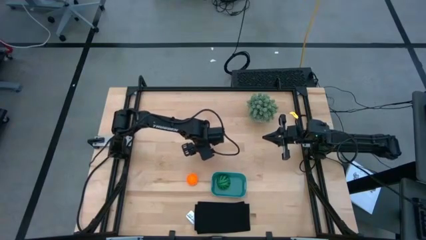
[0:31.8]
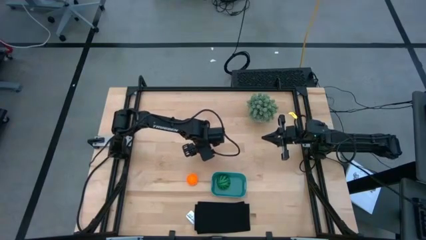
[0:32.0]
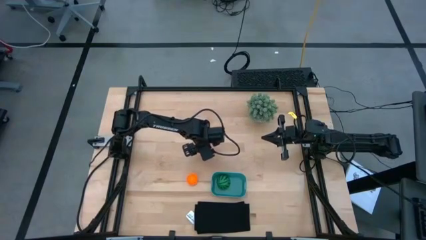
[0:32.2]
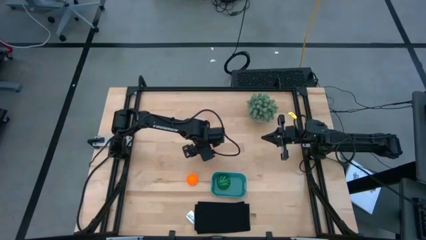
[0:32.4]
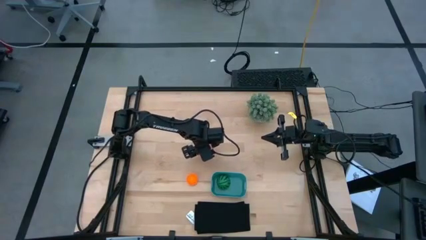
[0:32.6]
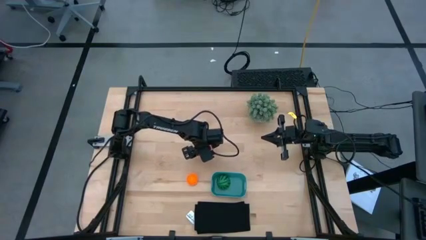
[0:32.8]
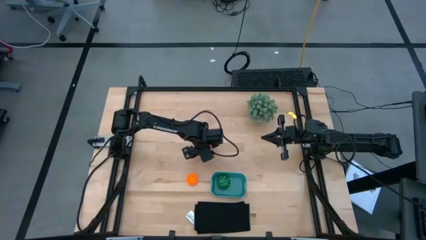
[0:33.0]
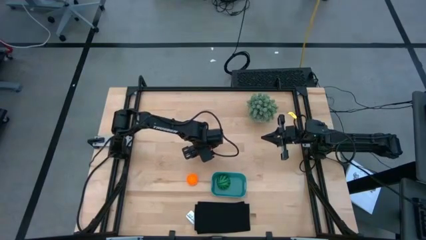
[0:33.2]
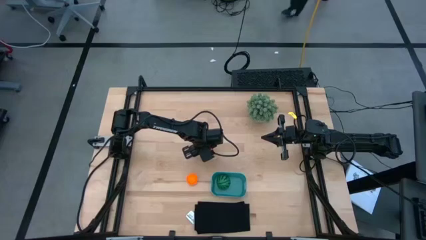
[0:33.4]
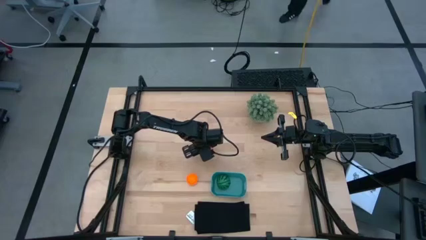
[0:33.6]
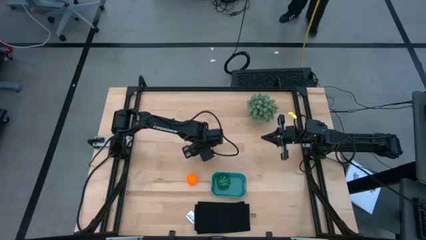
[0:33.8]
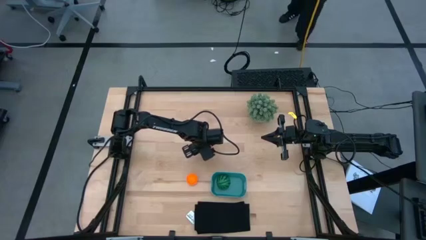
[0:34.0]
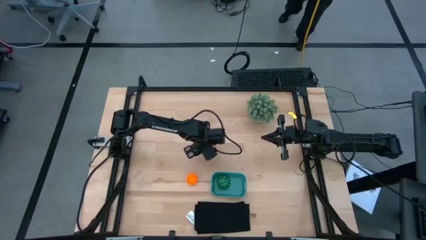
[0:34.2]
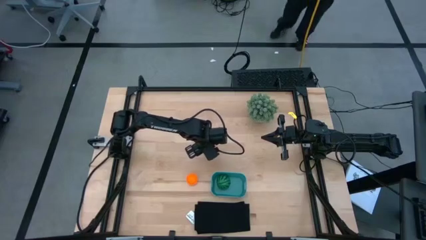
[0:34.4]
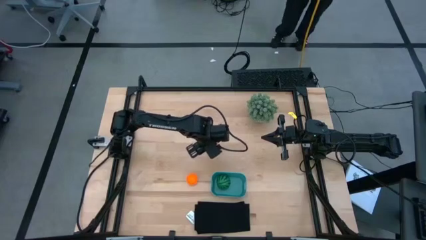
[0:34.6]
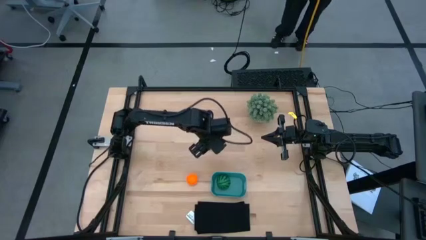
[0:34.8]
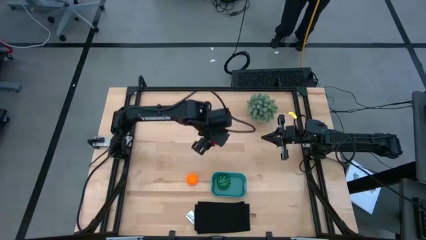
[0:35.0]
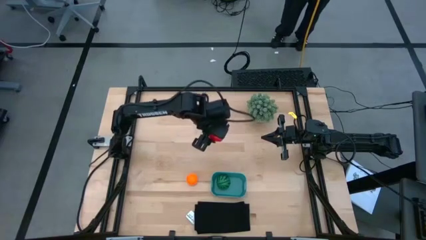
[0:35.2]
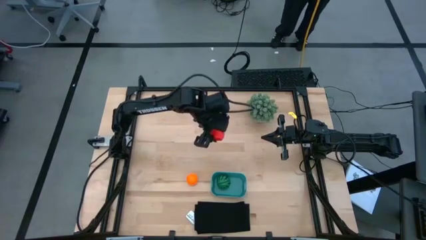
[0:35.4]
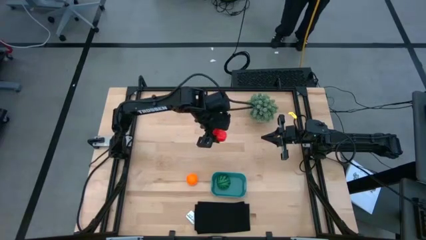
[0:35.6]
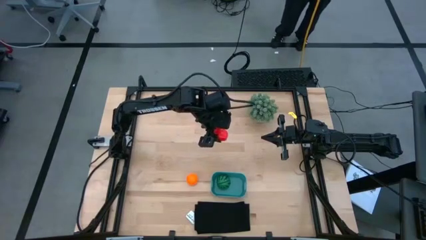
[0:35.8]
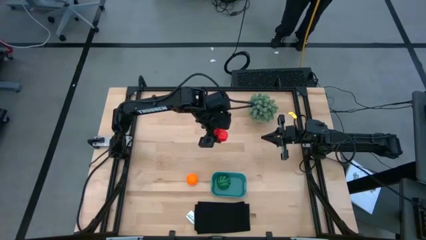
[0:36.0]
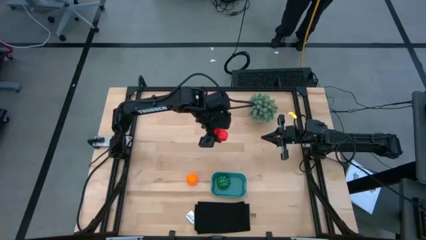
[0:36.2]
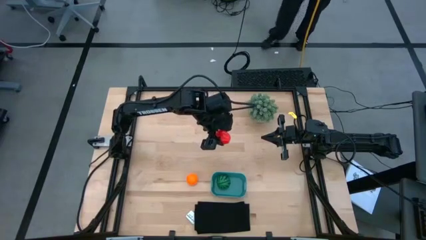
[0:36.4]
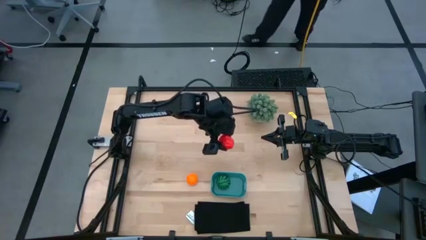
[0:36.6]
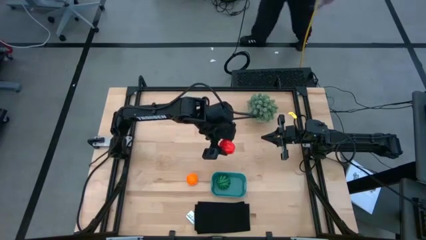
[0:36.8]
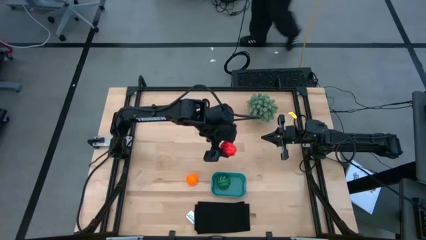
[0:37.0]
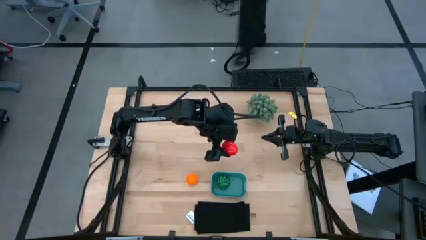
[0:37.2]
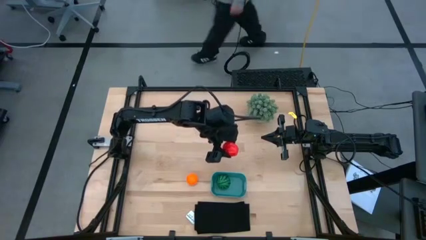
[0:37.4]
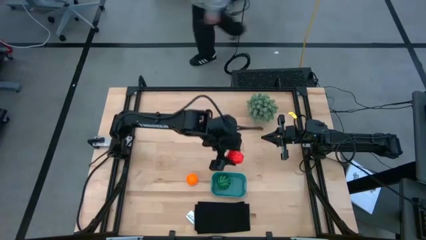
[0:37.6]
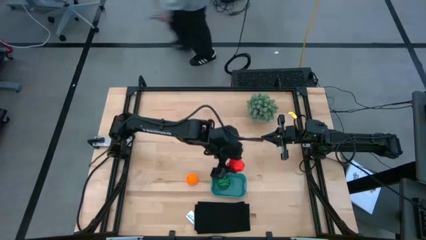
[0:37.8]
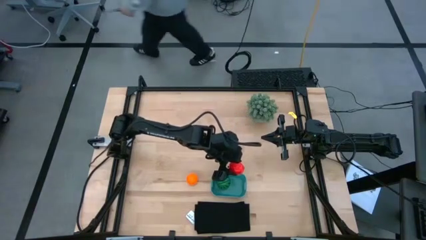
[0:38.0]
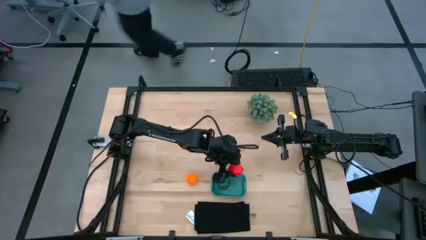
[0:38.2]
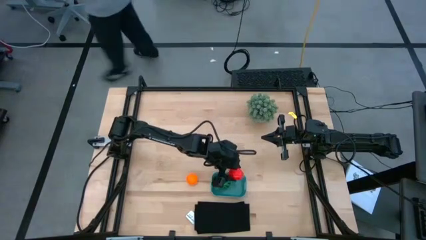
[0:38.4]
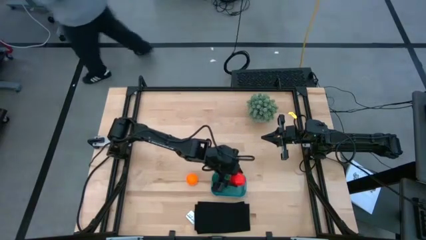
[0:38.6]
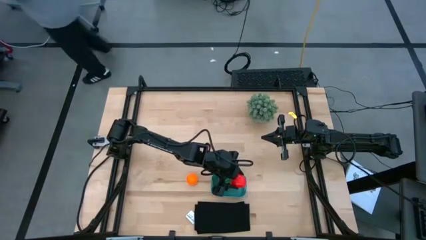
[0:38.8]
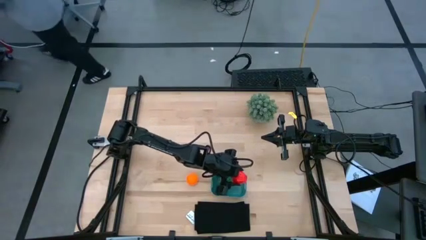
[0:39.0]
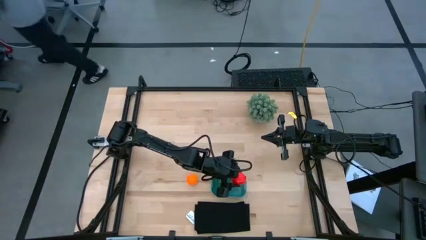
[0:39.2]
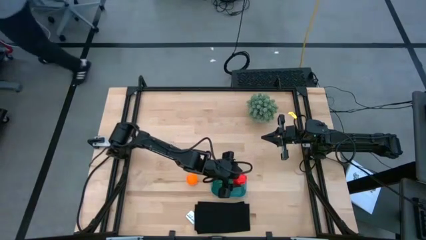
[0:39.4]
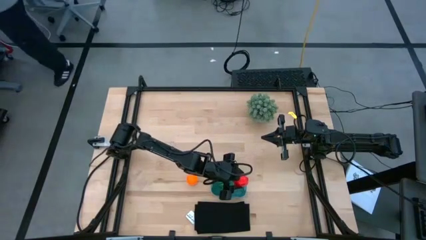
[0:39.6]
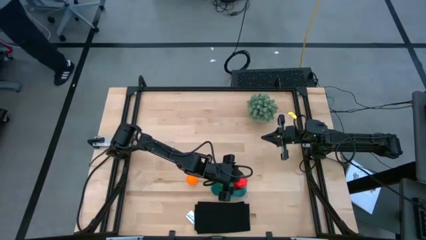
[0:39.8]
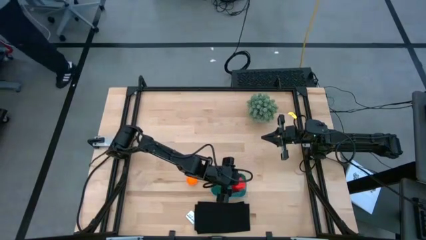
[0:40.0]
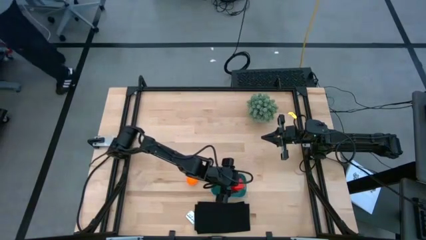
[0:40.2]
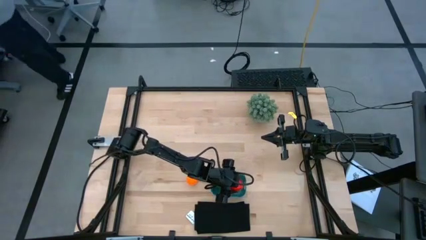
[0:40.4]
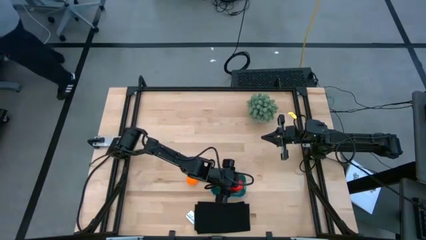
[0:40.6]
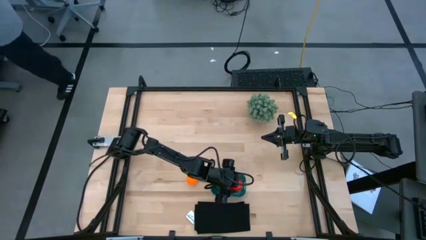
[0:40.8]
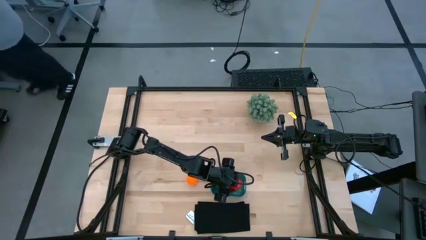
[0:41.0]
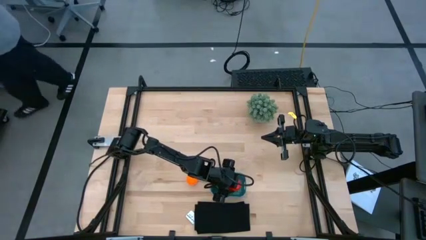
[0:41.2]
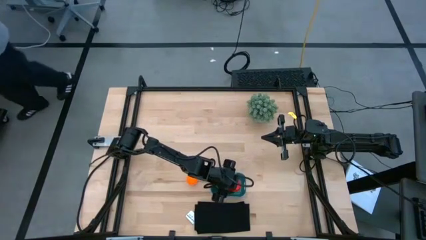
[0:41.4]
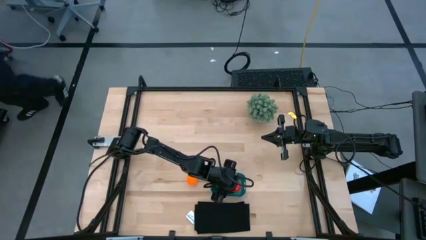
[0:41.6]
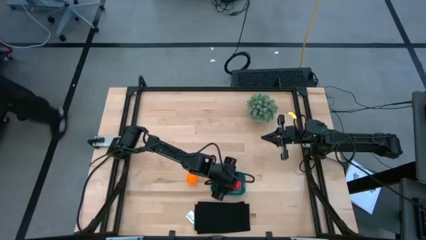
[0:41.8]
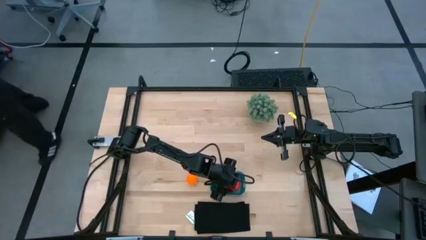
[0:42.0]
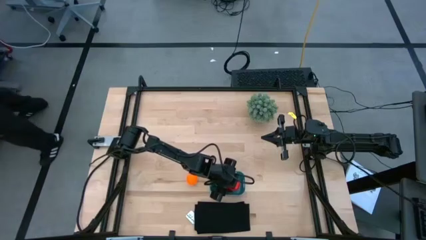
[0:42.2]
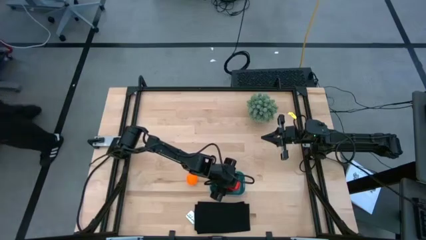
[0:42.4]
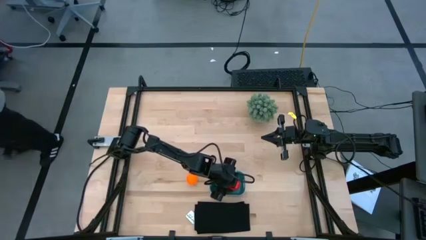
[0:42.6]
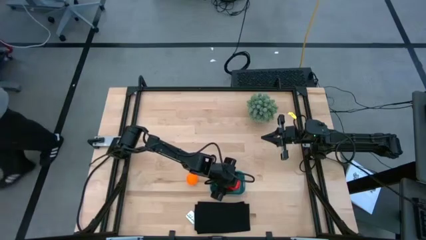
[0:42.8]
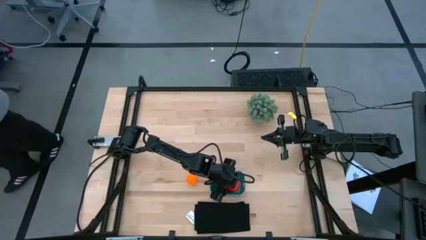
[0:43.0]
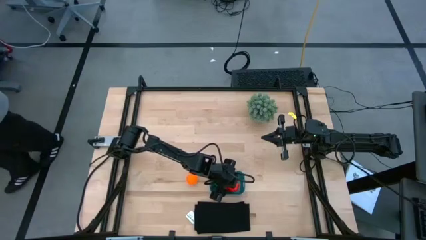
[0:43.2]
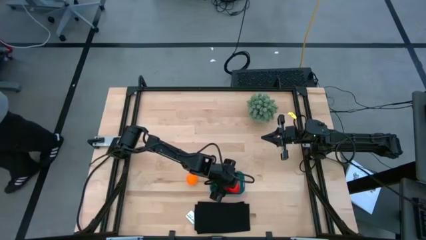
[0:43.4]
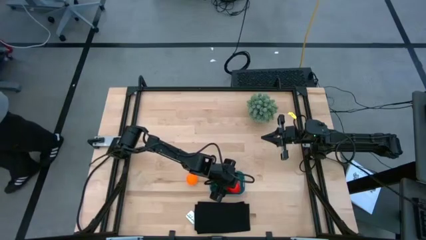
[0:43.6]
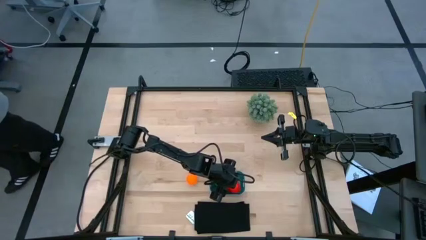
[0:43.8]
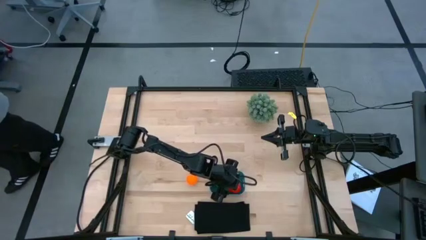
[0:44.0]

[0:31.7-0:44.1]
Task: Pick and placing Produce into tupperware
Put the apple toy into the green bin

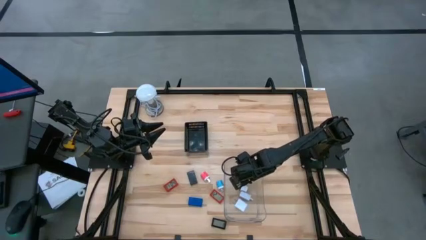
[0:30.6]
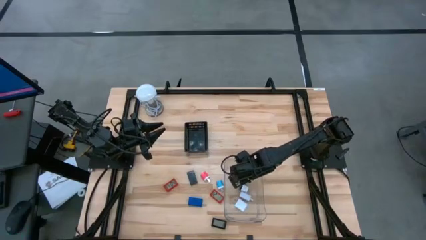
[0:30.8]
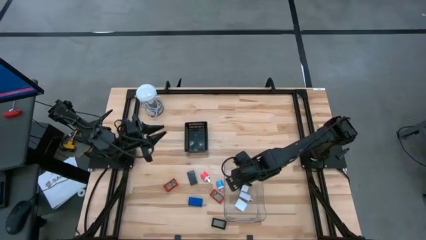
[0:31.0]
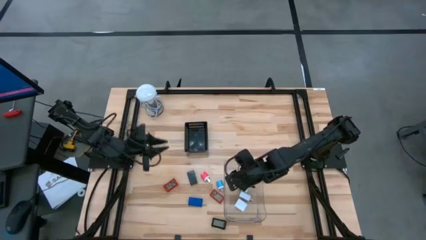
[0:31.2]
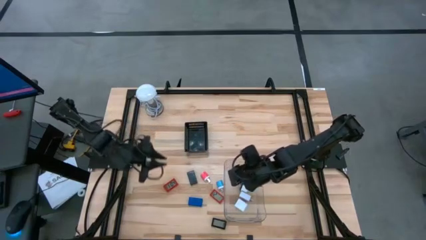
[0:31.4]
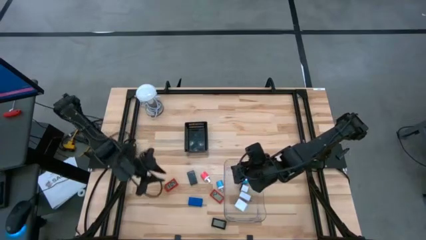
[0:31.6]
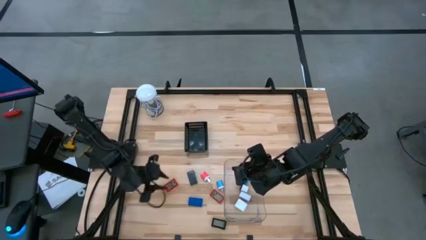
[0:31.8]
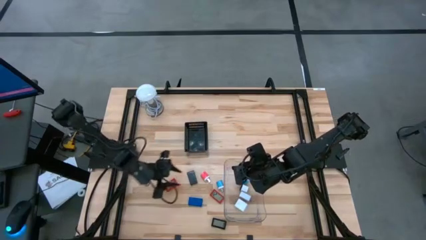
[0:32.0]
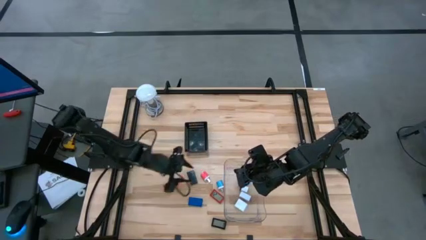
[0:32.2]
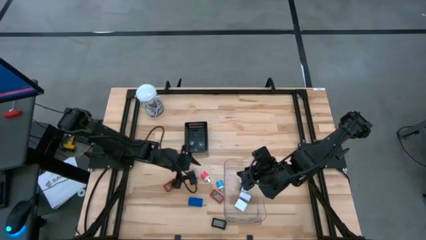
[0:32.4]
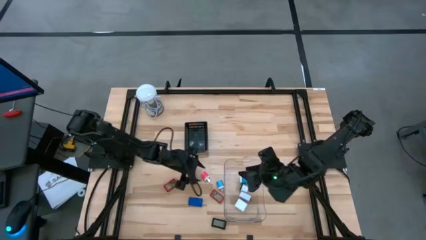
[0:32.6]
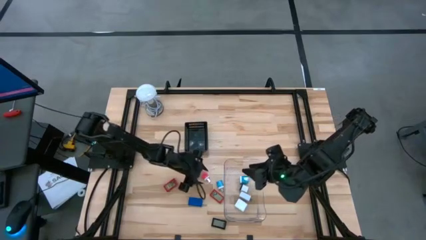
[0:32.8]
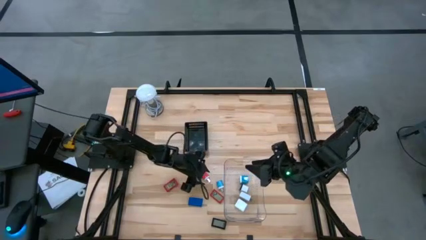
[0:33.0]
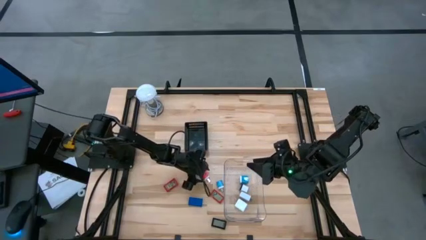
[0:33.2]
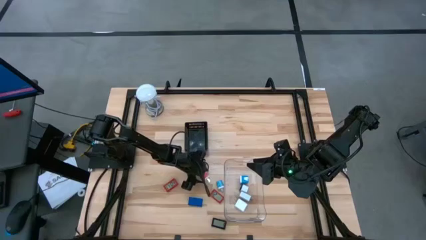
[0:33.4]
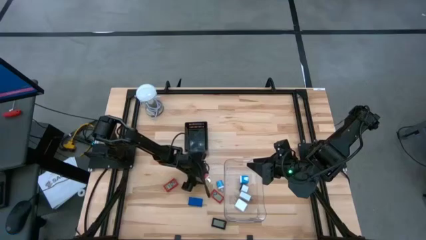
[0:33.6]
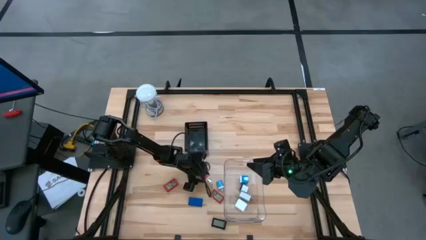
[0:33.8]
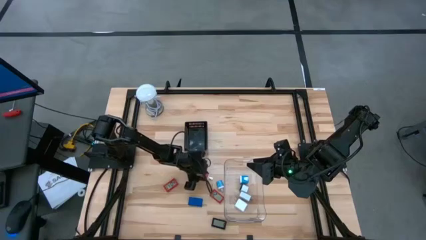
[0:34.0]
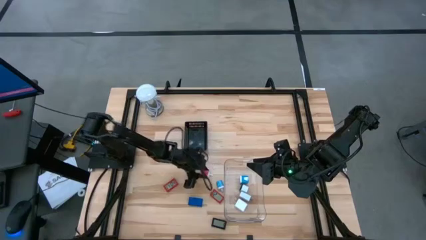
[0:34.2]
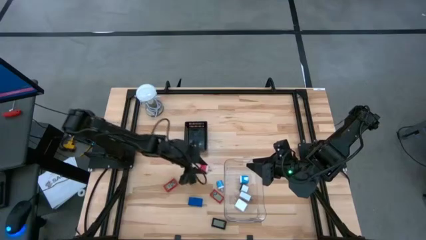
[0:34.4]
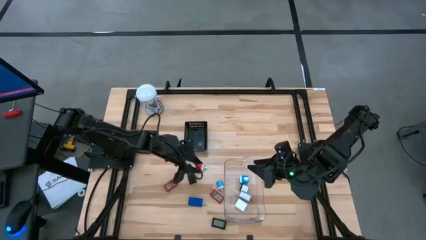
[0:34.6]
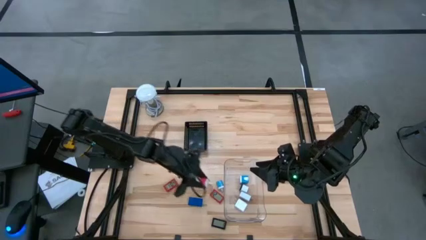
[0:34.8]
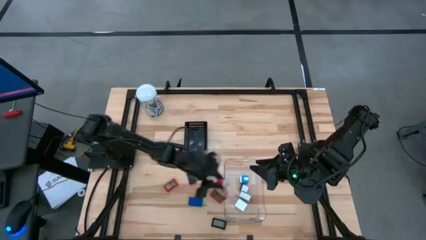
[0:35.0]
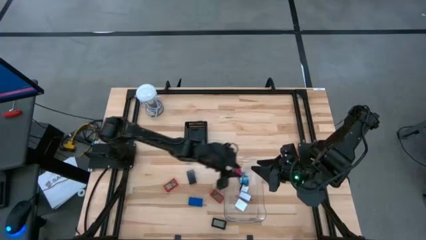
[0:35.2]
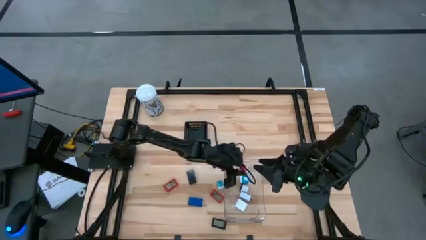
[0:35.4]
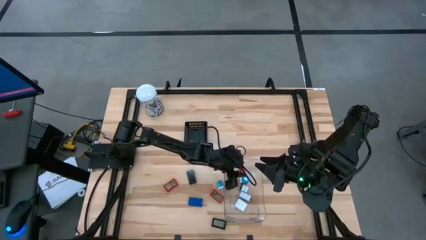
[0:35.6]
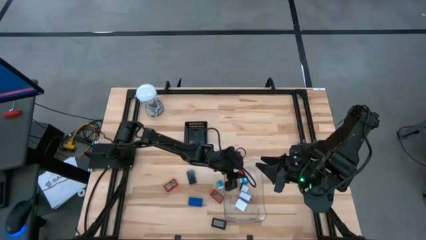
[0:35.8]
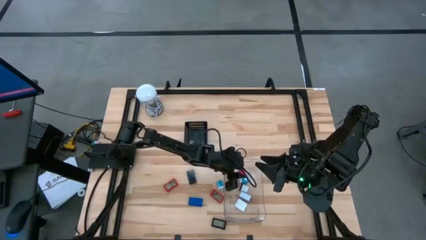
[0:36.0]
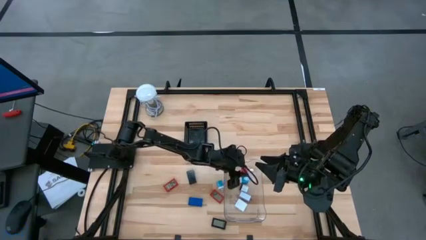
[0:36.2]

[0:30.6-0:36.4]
Task: Pick & Place Office items
Put the pink charger adapter into the transparent bin
